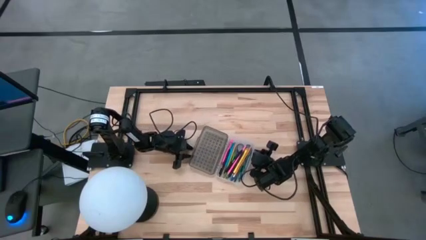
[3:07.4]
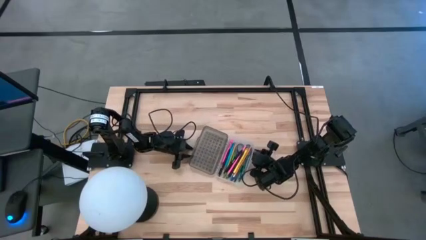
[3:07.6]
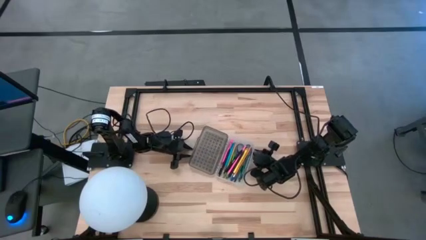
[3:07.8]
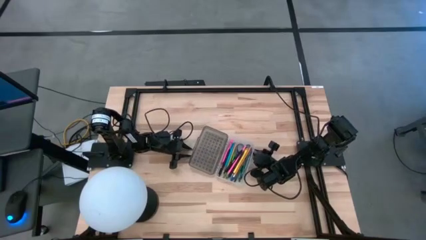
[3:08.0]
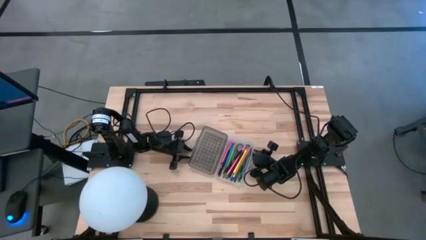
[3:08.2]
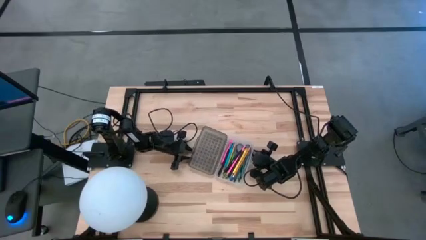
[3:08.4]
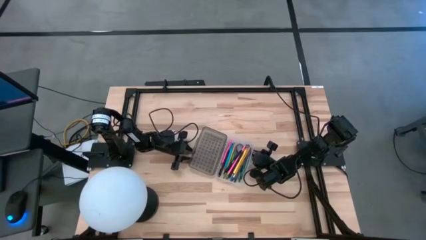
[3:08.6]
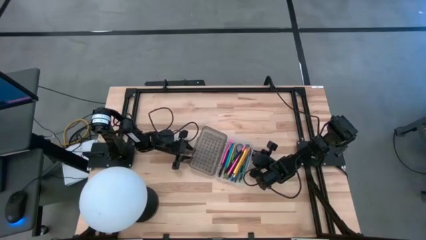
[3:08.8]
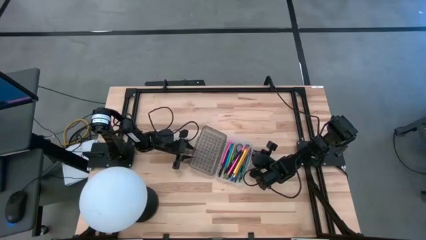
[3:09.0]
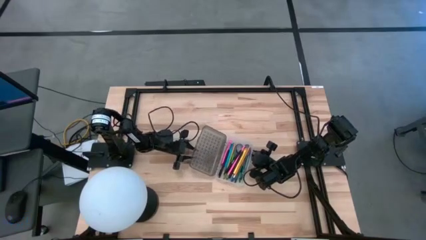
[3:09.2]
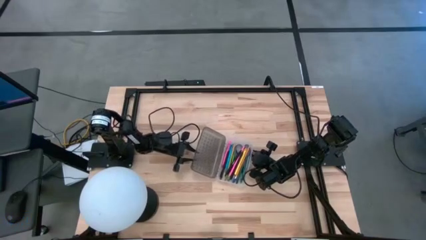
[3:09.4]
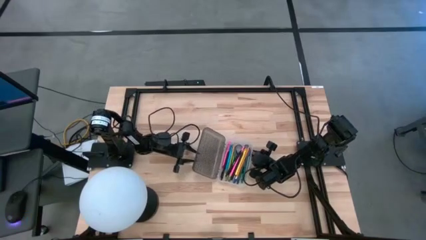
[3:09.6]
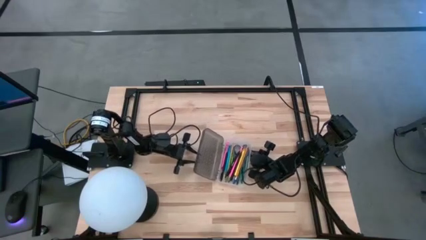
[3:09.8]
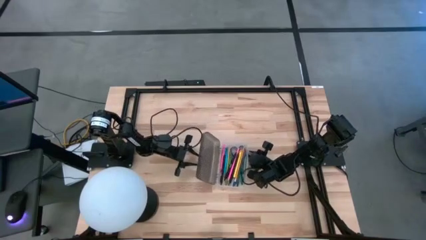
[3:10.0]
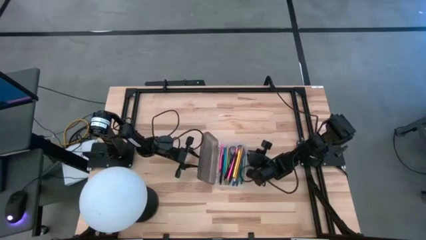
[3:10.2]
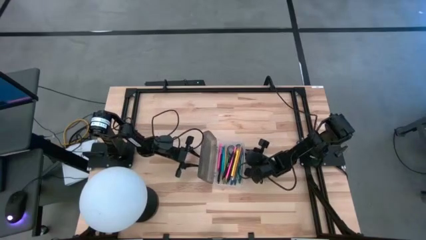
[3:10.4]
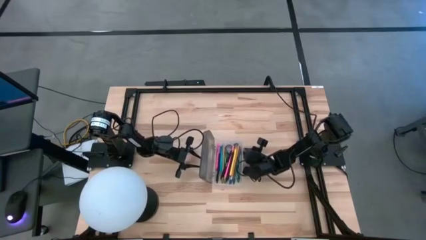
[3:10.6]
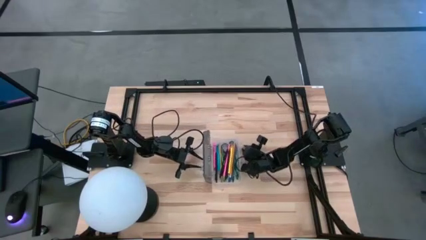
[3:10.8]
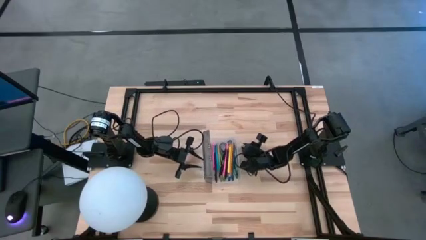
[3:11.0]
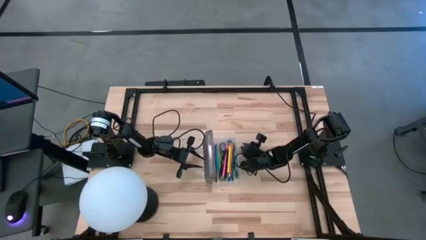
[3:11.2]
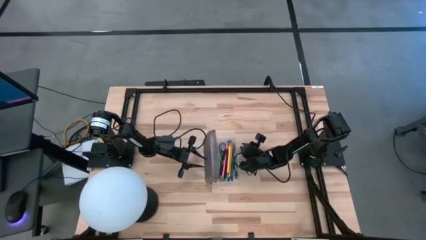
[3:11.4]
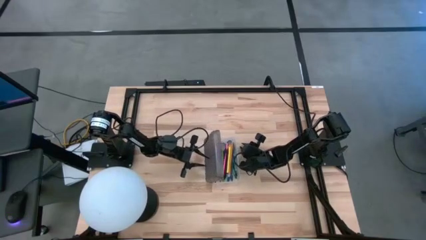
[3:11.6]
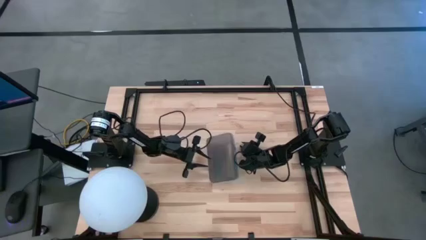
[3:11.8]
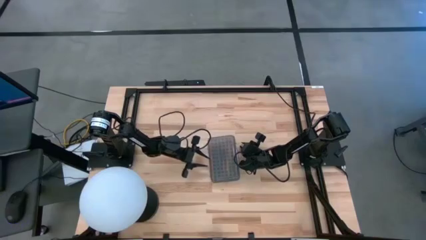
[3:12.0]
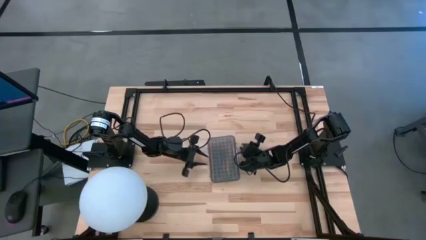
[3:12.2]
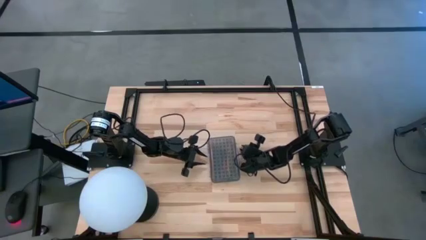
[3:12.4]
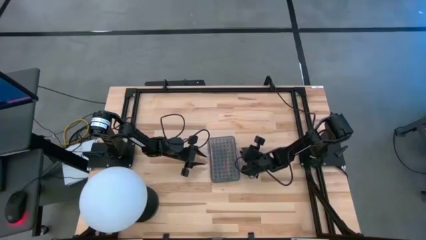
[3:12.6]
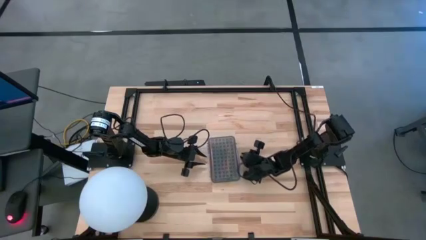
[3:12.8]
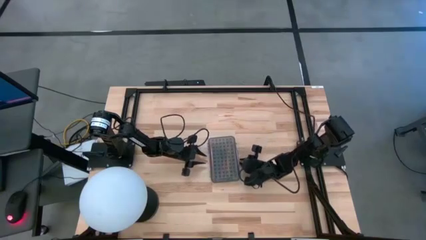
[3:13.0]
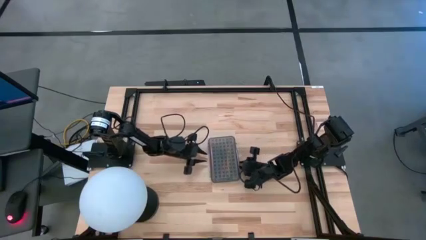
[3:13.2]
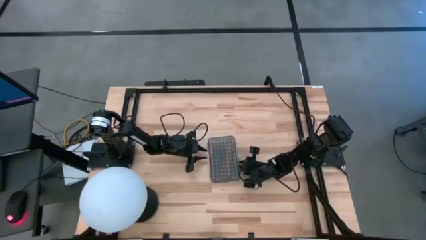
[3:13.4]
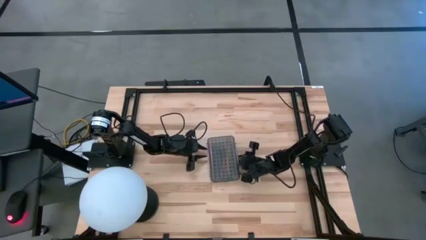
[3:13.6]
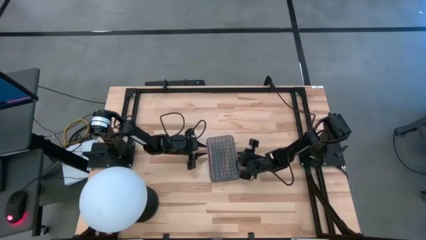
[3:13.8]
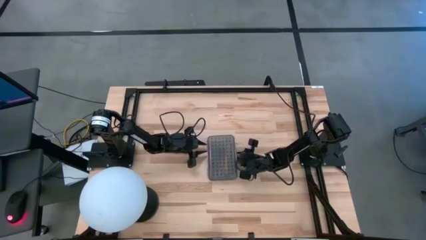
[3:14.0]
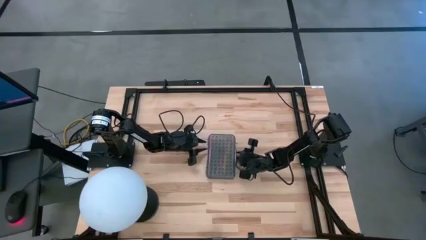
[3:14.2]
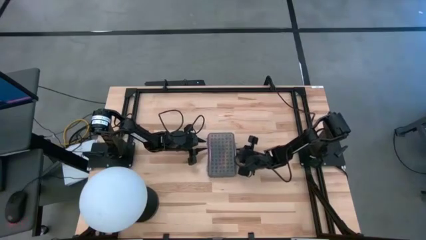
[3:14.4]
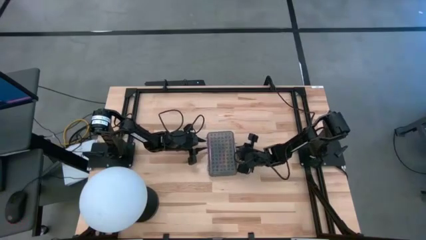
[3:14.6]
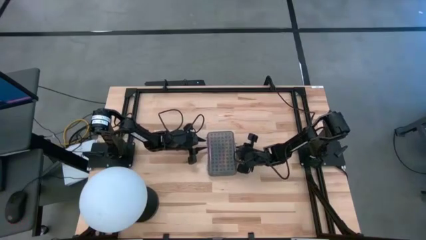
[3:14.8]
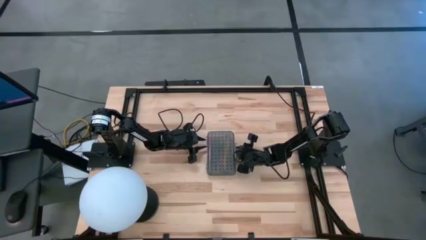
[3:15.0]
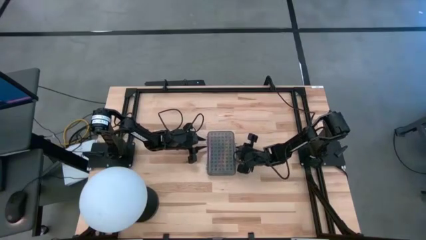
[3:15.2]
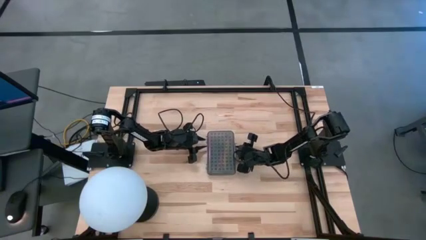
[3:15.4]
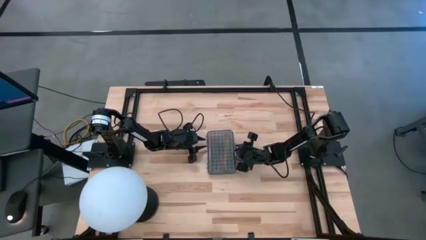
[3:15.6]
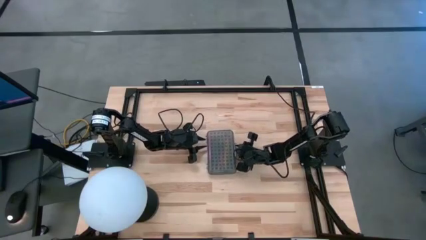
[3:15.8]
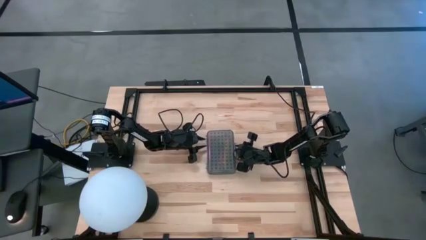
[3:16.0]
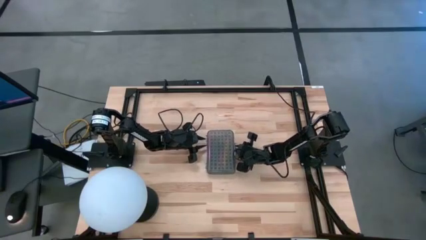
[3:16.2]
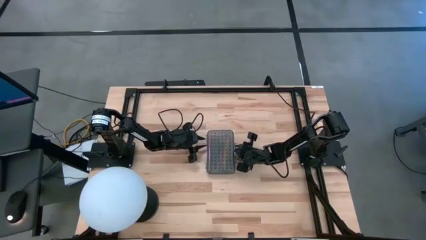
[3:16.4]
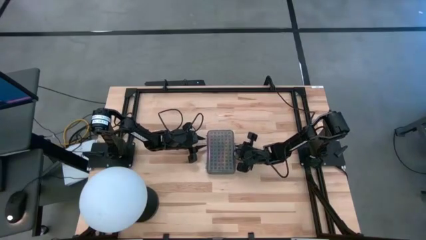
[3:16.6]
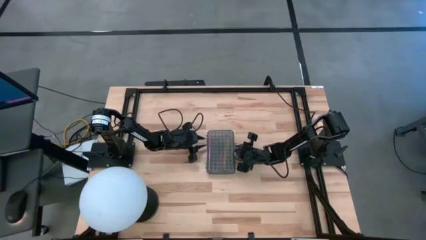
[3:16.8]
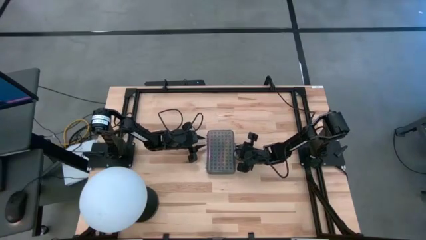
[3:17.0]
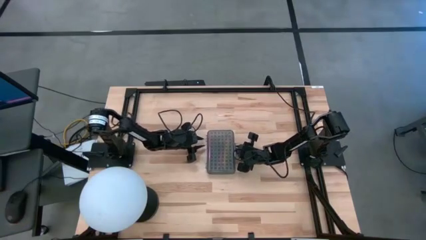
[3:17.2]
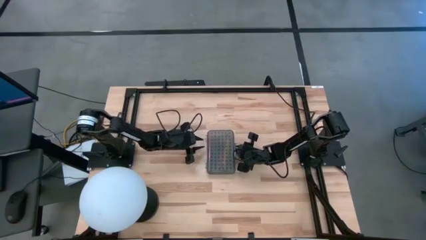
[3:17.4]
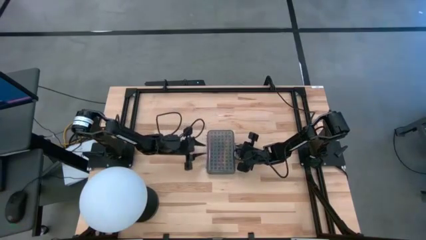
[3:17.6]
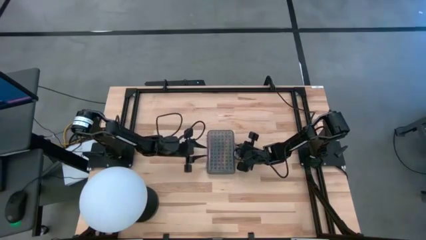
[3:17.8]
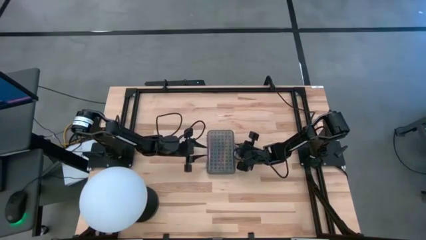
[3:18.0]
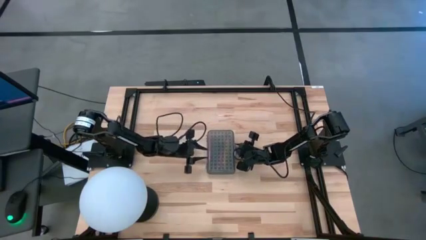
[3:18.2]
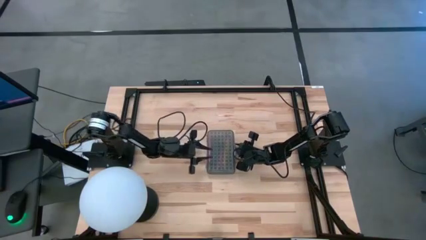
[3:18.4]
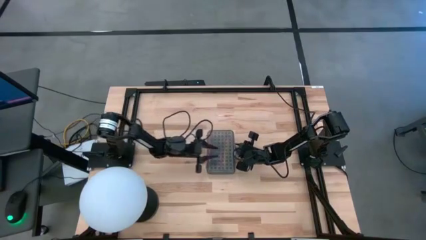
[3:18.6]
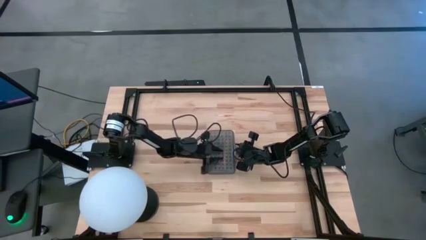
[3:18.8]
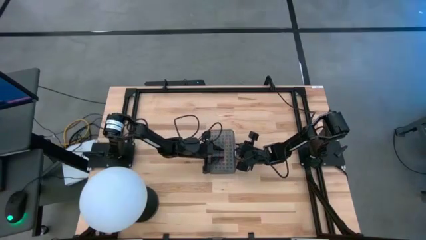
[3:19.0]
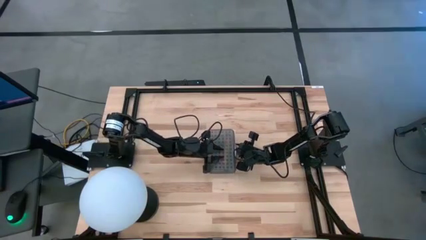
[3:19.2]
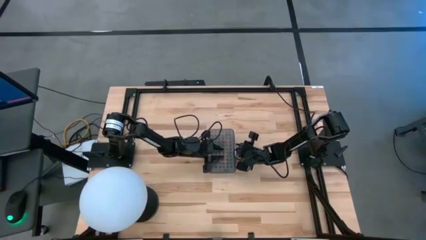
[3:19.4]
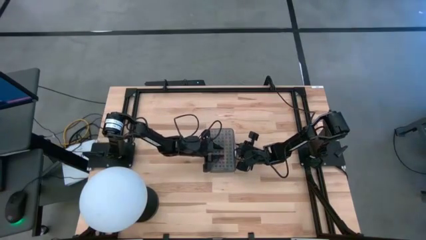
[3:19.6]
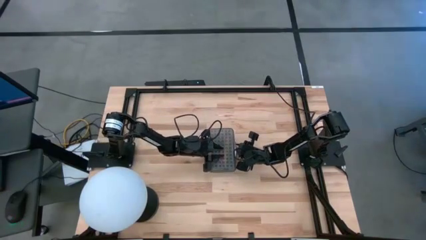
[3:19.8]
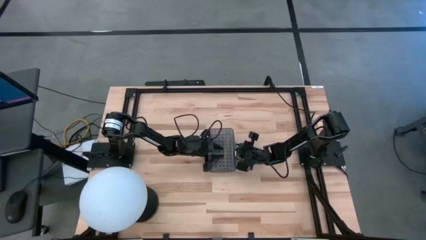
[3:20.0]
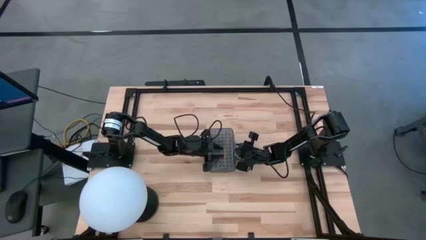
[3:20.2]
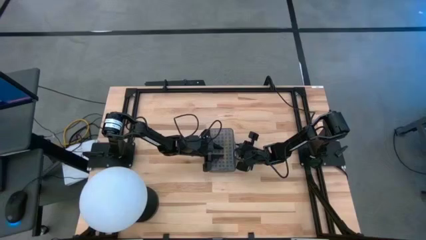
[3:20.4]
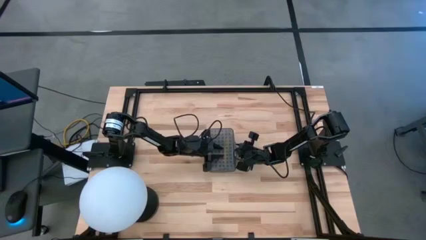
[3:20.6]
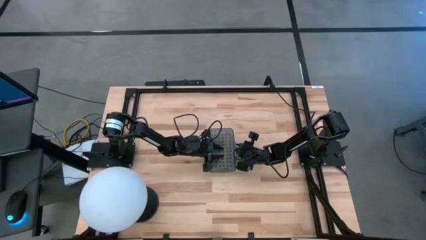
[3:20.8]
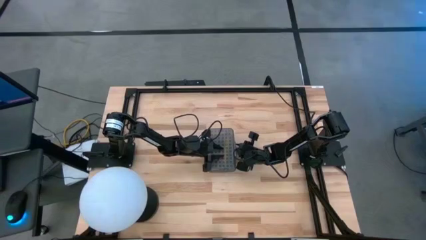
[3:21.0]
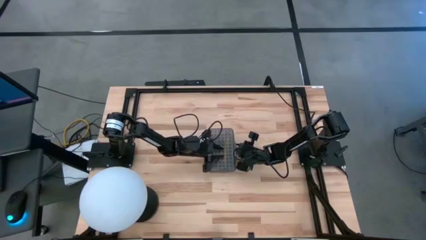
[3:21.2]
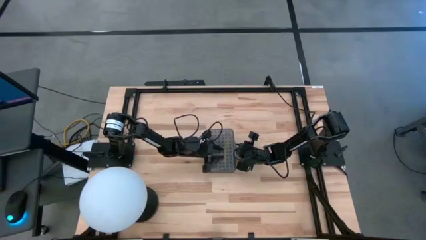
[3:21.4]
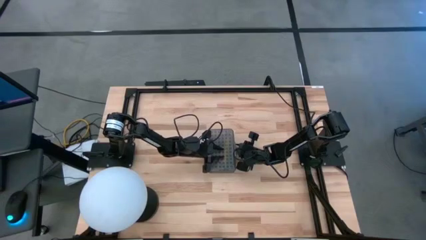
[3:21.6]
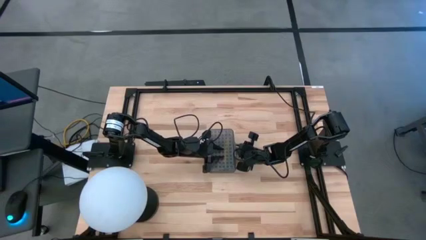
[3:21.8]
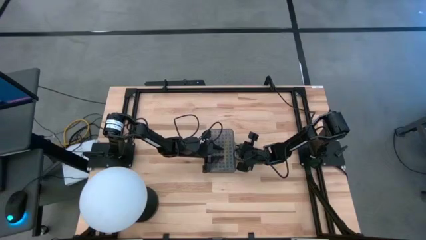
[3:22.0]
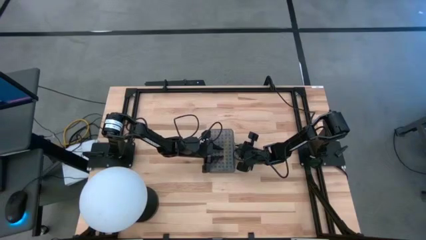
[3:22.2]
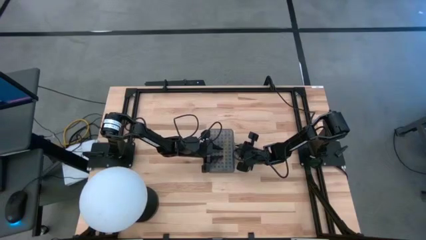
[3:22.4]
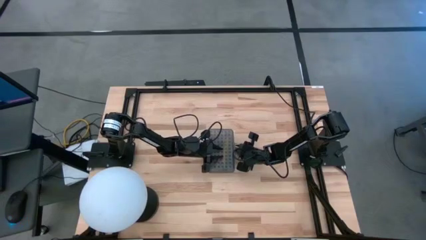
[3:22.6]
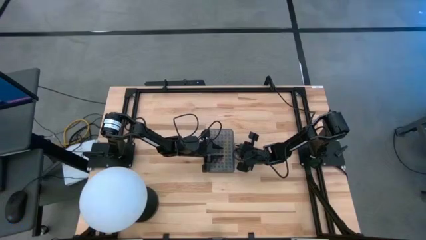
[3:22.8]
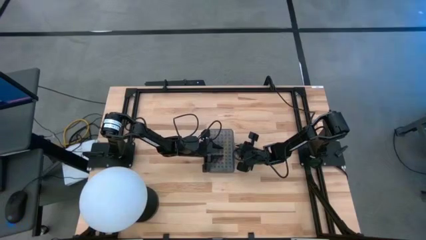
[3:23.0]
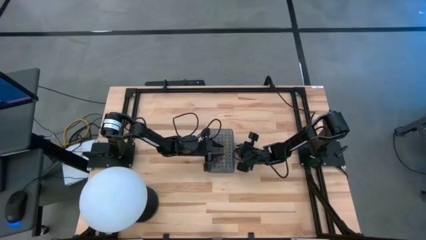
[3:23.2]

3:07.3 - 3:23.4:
Task: Pick & place school supplies into a supply box
Close the black supply box

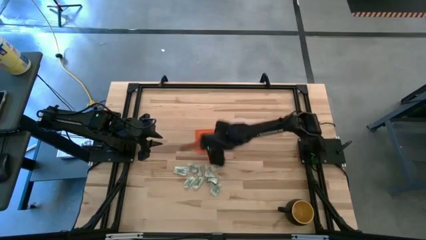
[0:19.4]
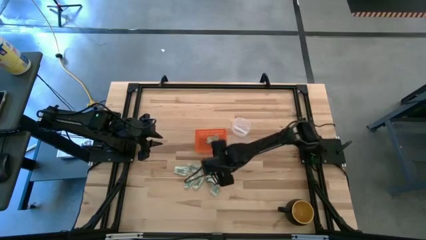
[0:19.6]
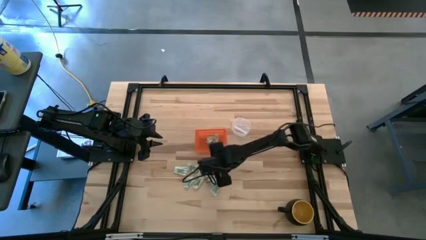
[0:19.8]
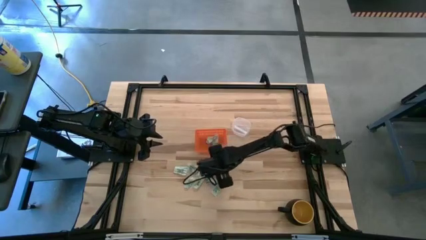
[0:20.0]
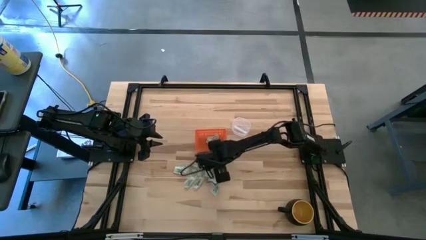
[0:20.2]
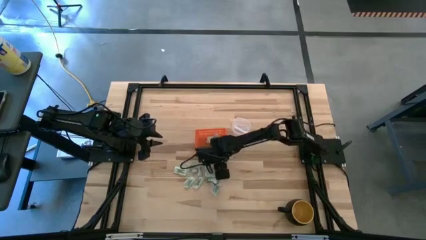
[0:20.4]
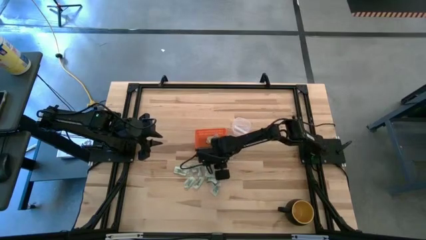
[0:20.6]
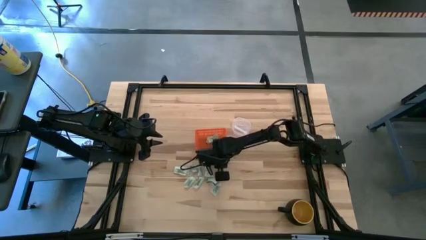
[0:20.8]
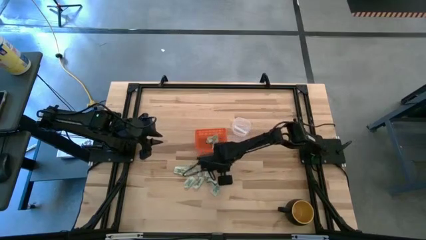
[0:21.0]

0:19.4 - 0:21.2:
Task: Pick and place Stevia / Truvia into bins
Put the stevia packet into the basket
